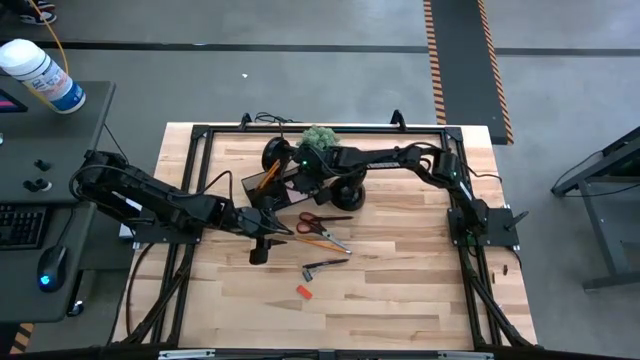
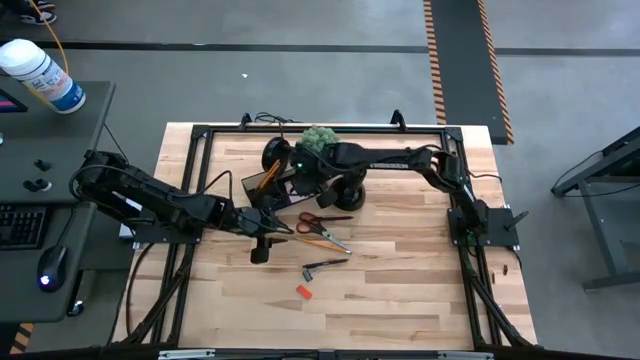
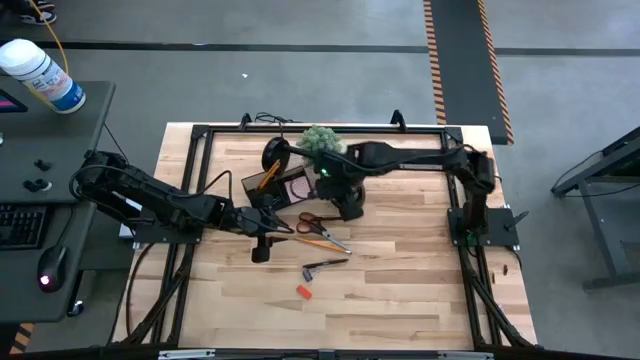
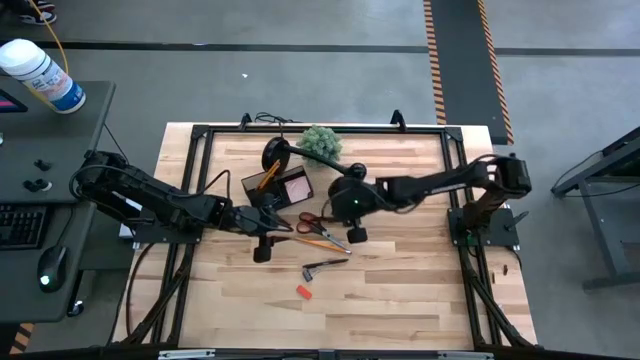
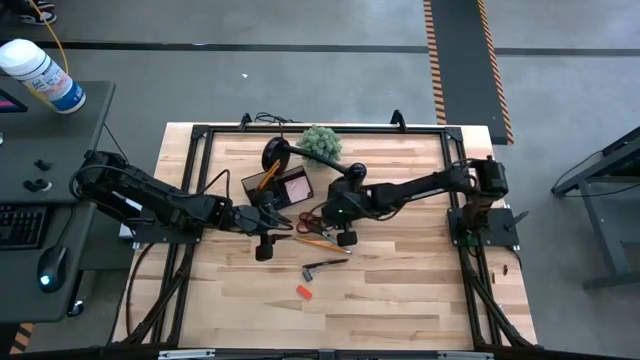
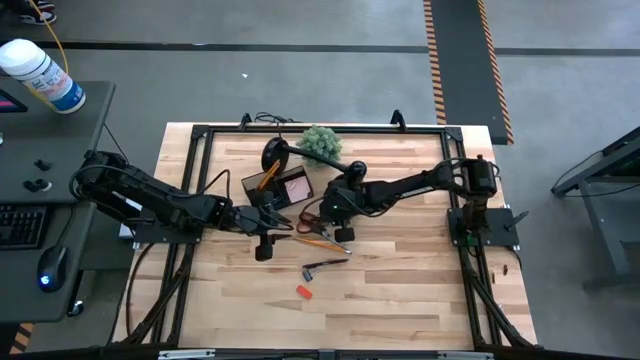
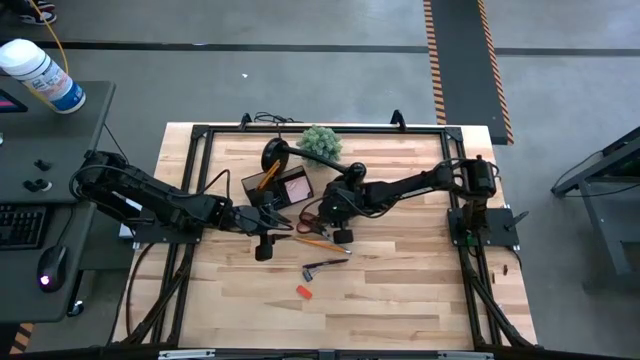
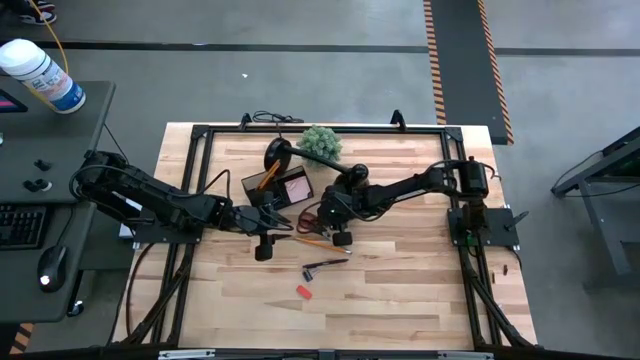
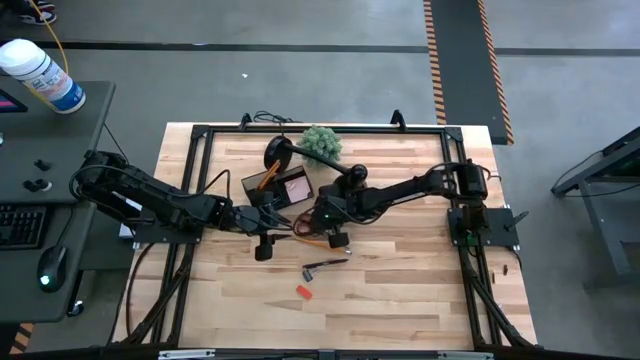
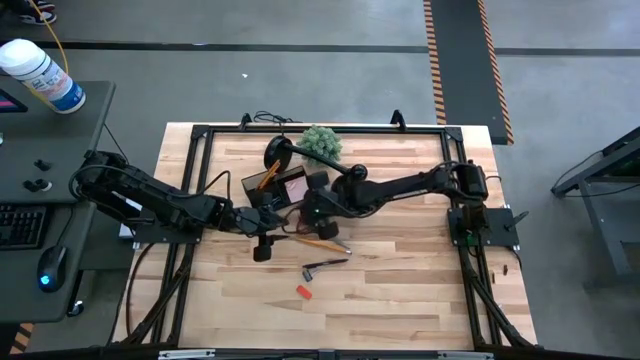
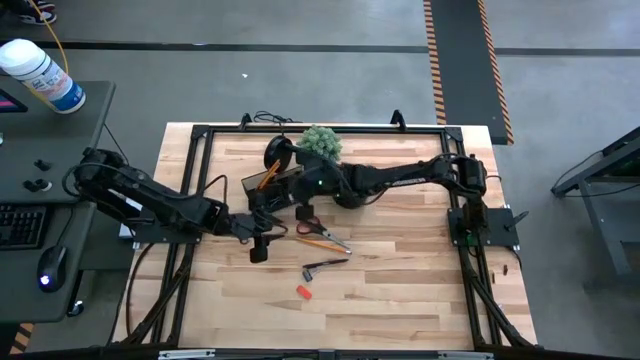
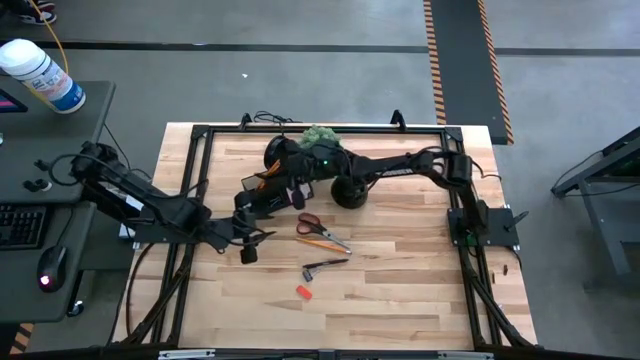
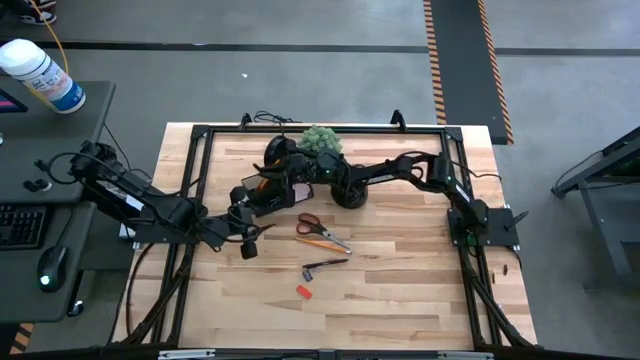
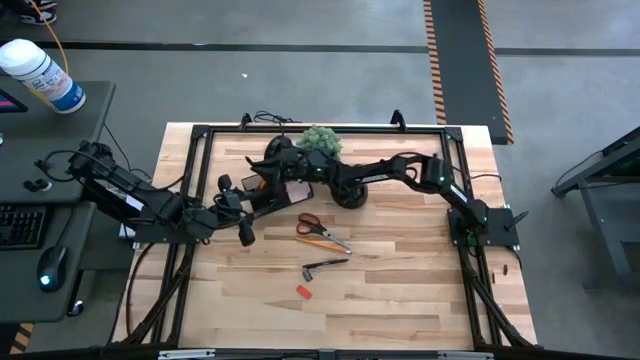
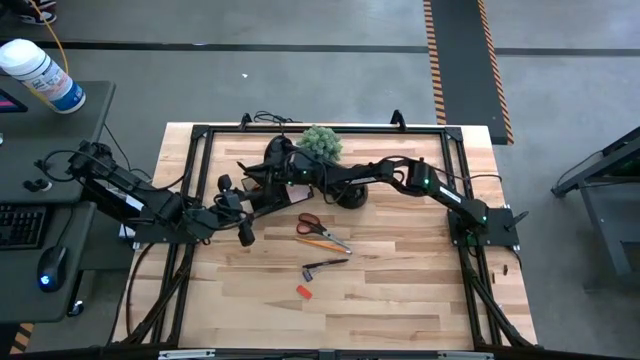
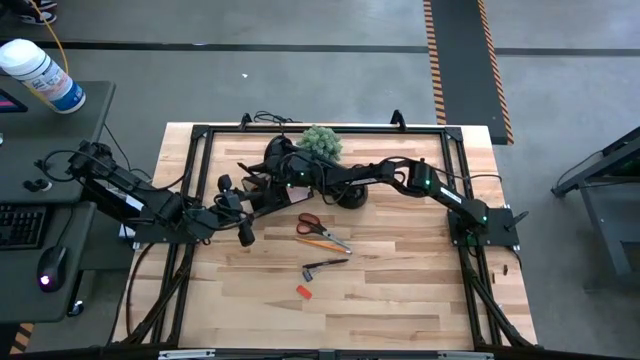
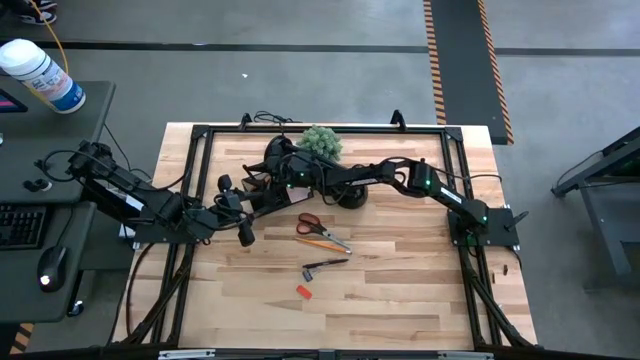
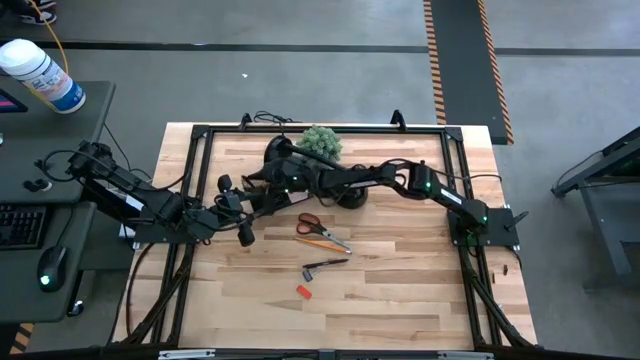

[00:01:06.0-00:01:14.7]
Task: Pick and place office supplies into organizer
Put the top black pen into the black desk organizer

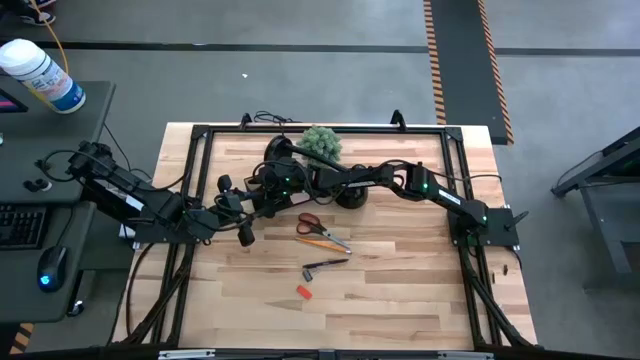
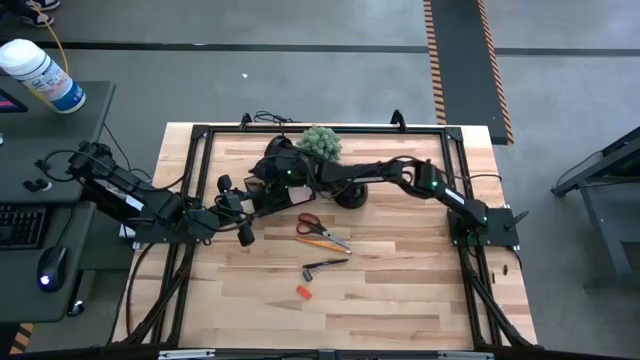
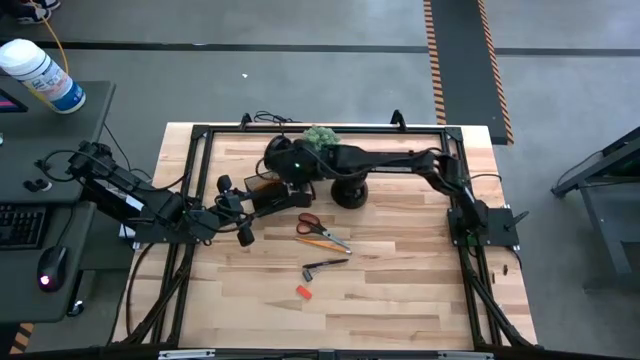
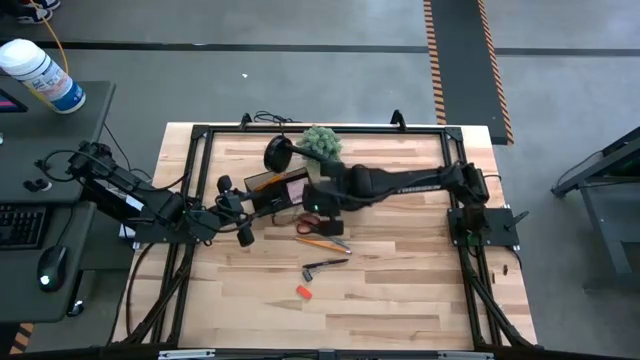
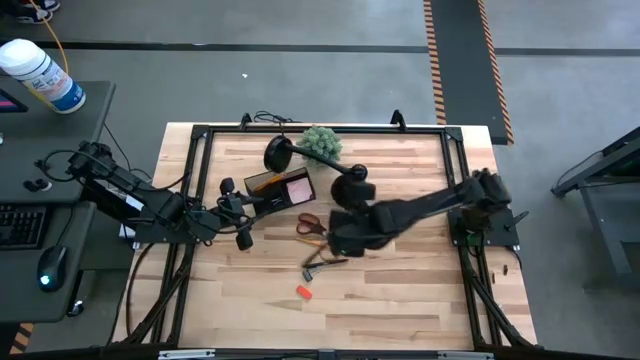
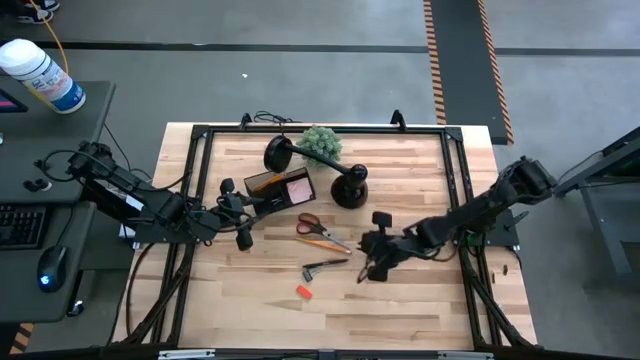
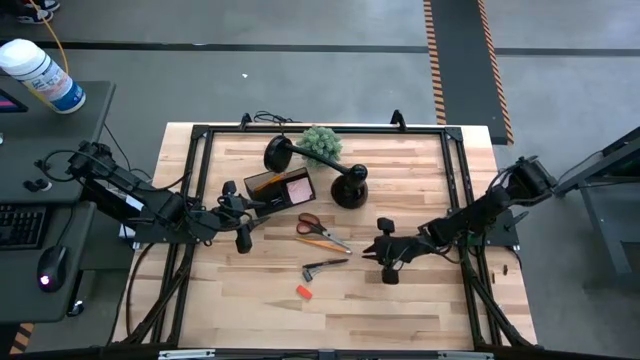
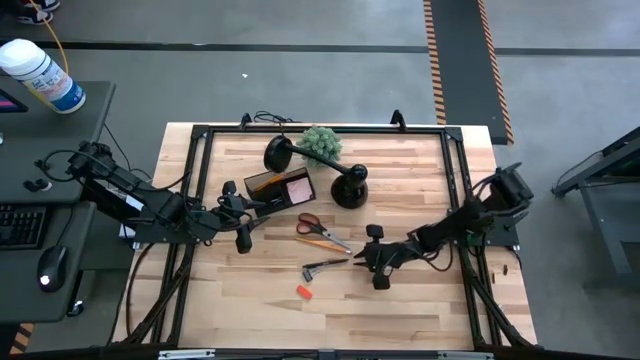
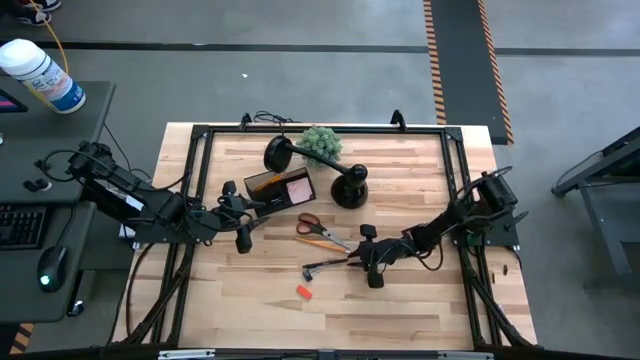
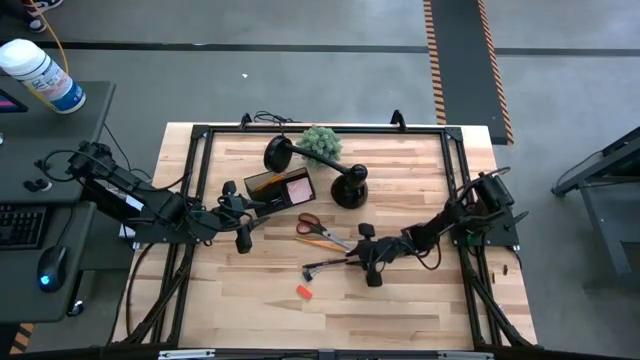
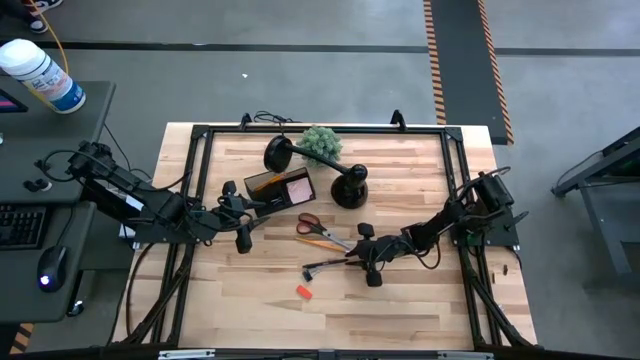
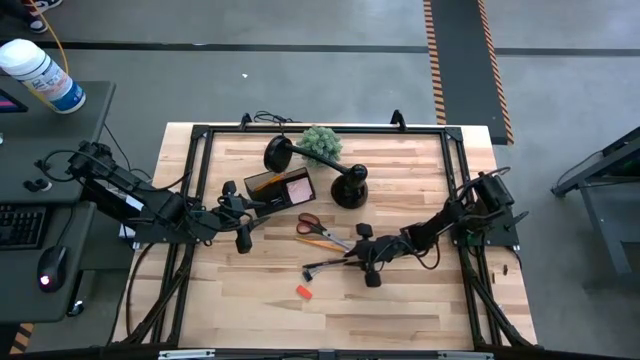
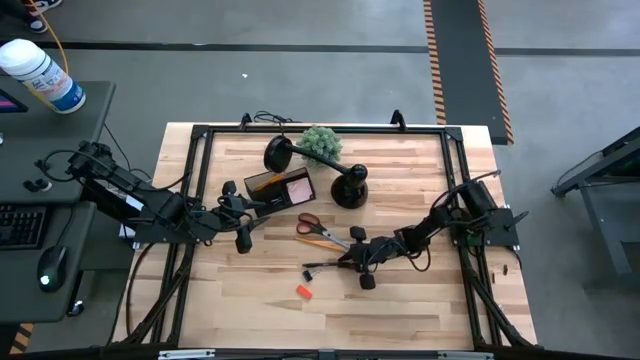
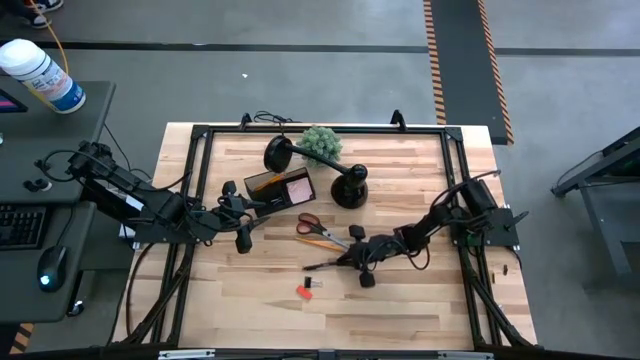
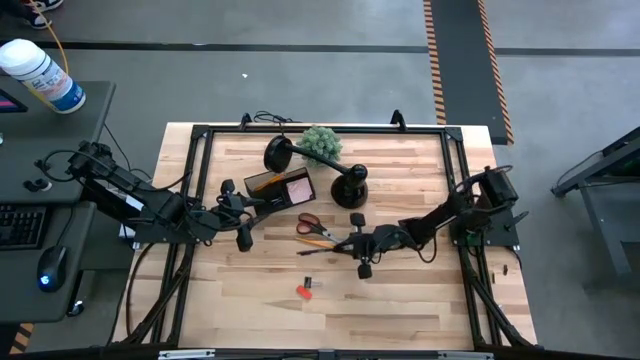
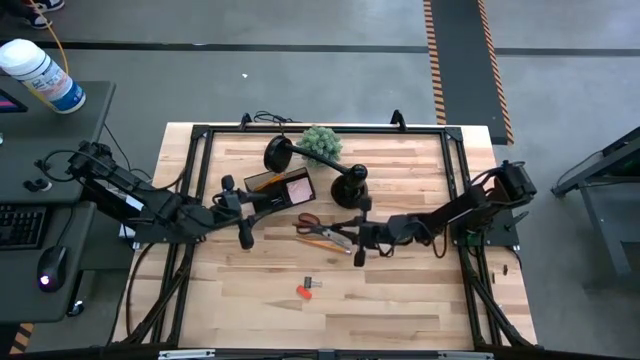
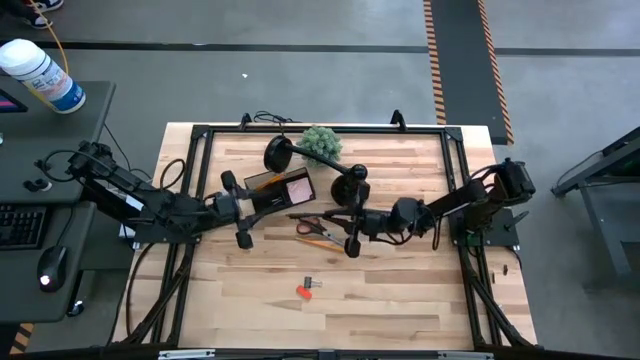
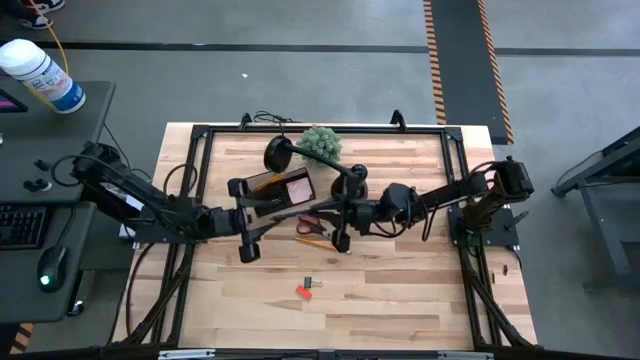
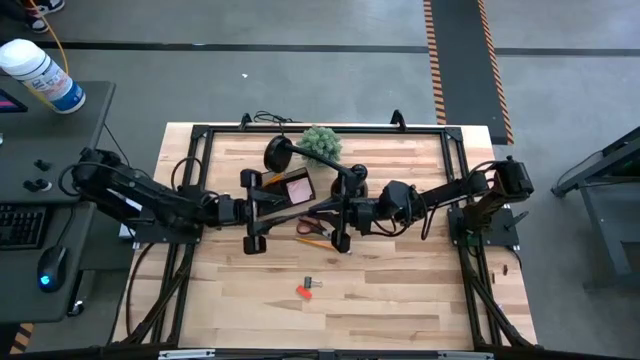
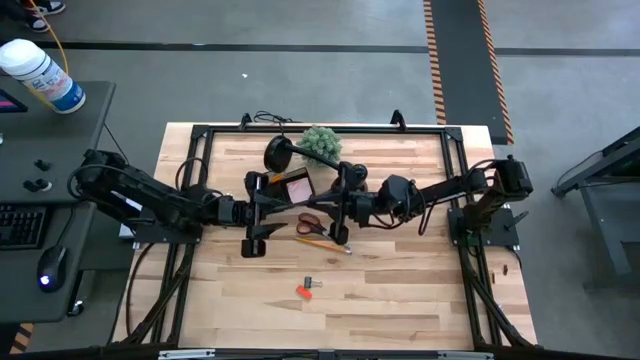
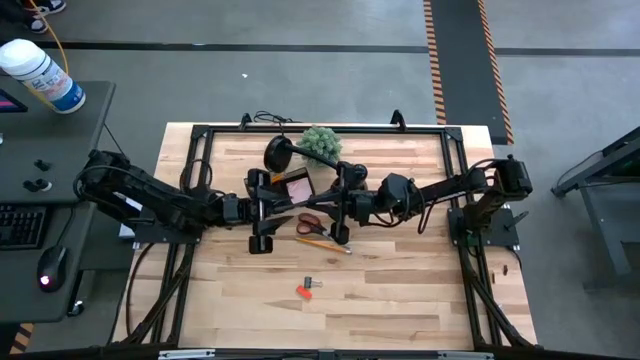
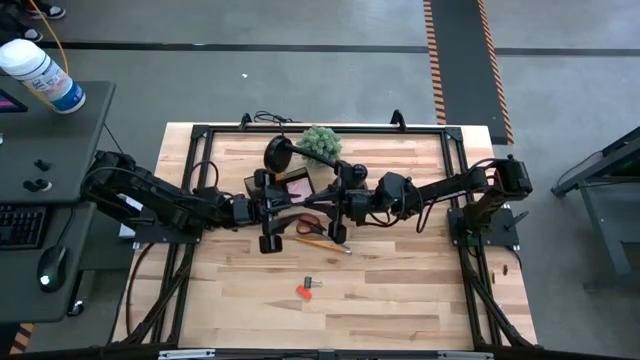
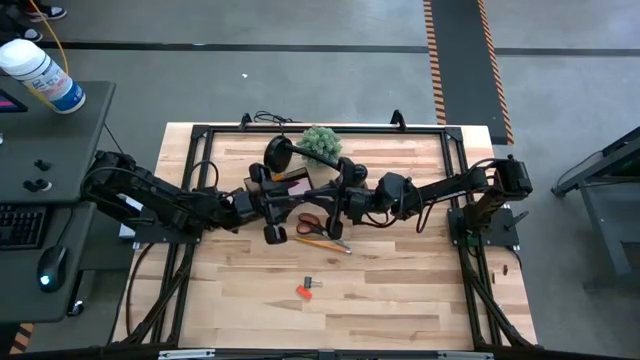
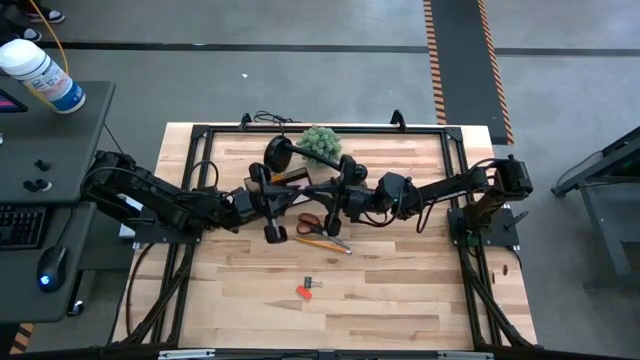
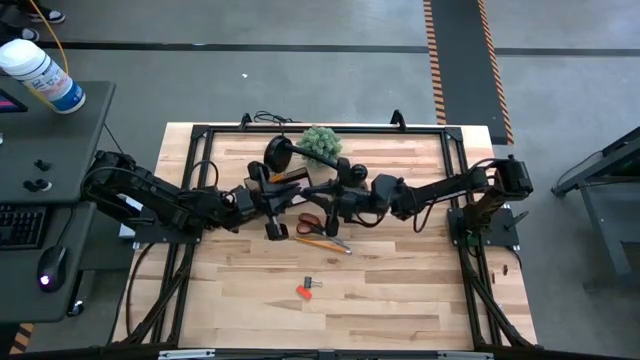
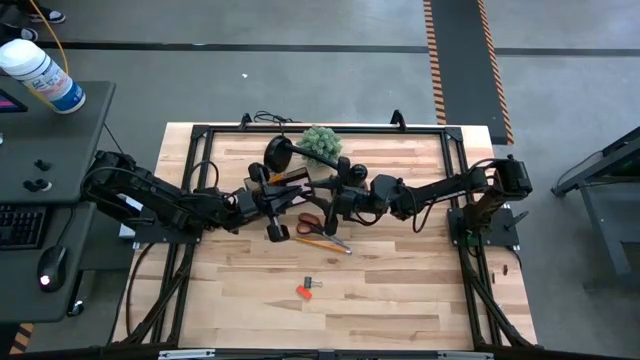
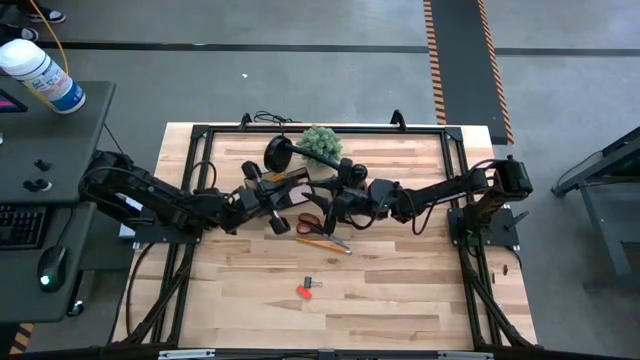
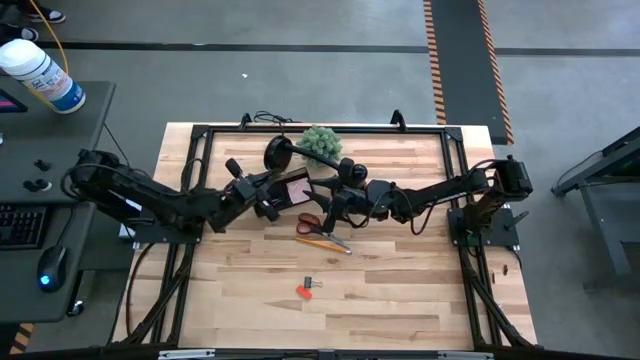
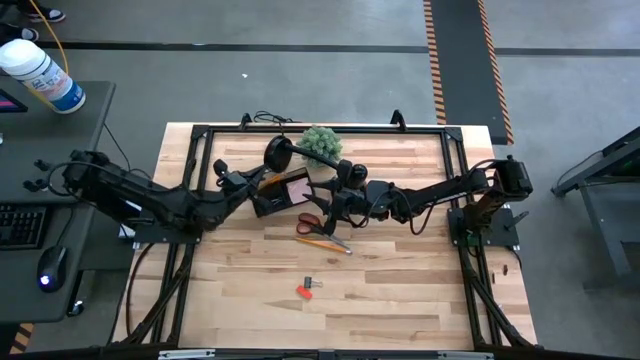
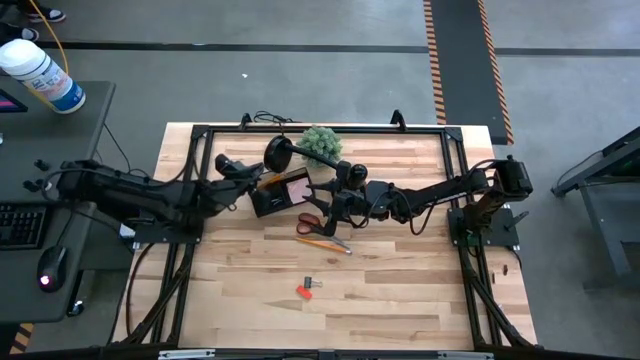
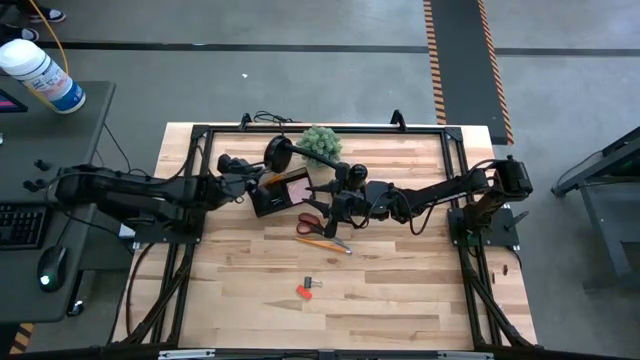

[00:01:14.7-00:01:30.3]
Put the black pen into the black desk organizer
